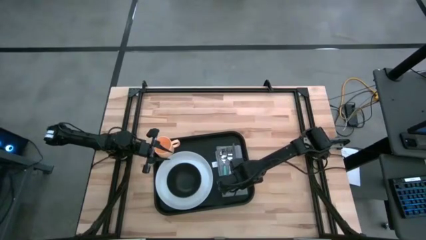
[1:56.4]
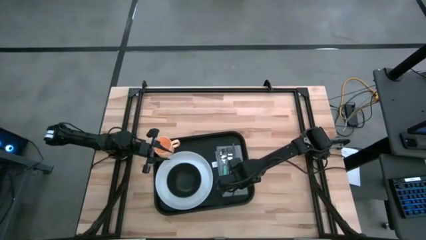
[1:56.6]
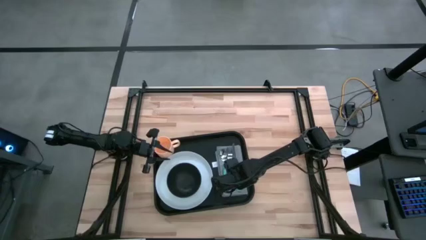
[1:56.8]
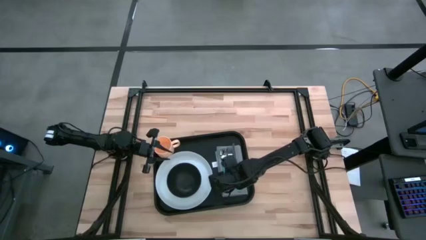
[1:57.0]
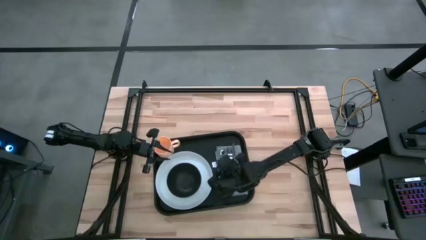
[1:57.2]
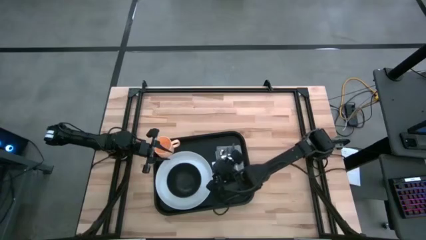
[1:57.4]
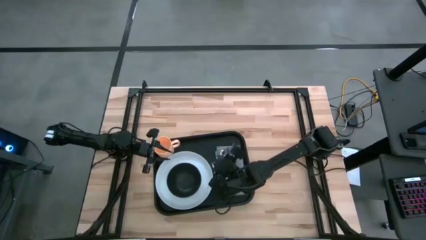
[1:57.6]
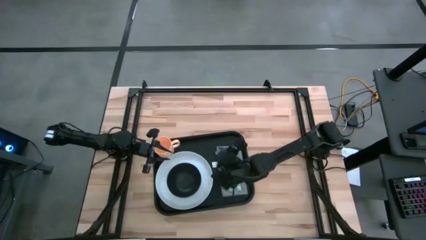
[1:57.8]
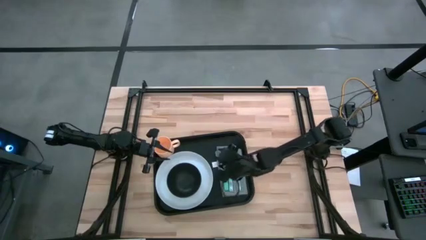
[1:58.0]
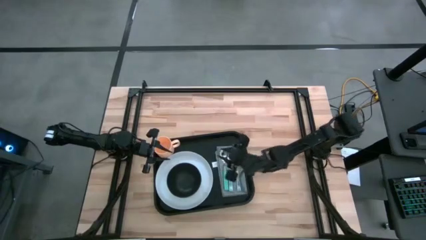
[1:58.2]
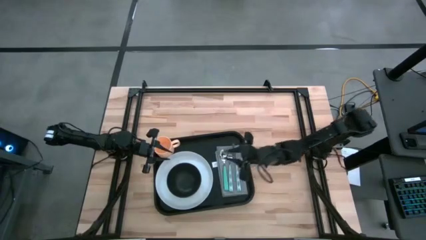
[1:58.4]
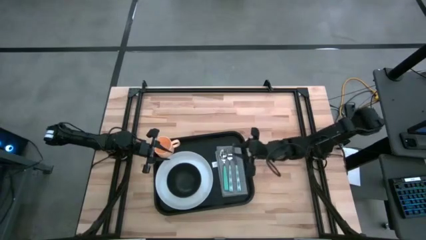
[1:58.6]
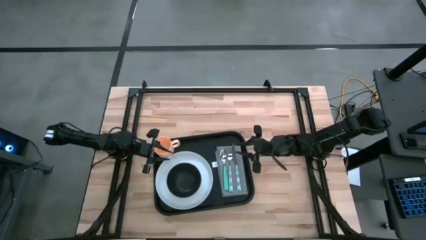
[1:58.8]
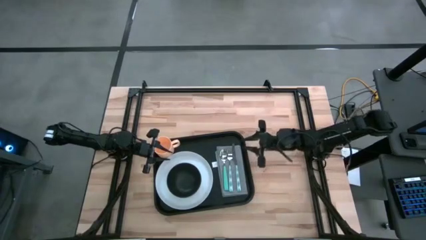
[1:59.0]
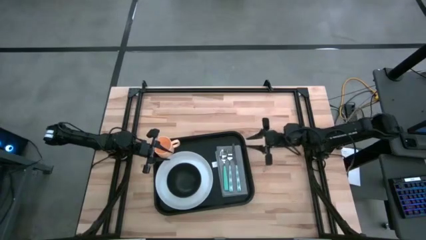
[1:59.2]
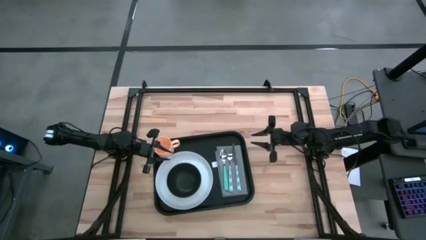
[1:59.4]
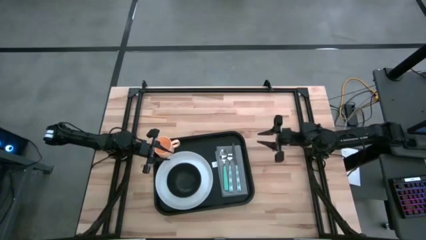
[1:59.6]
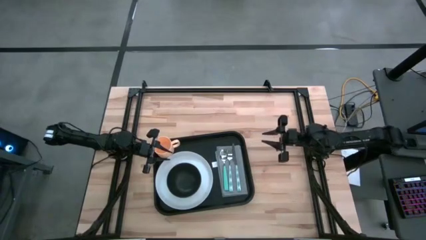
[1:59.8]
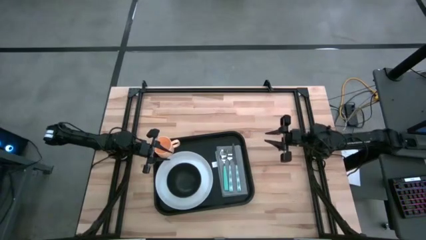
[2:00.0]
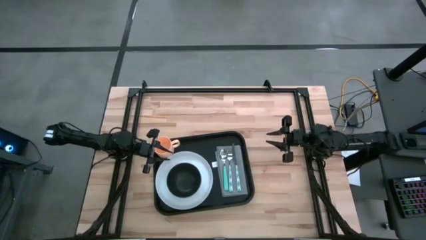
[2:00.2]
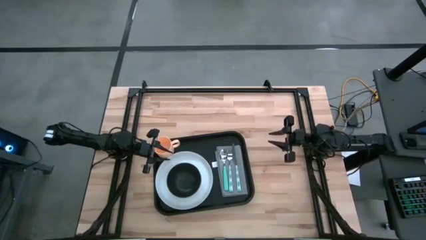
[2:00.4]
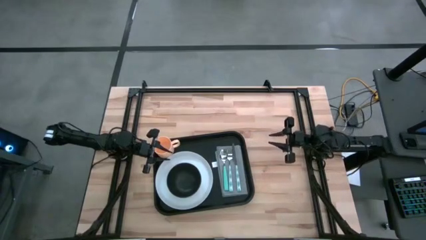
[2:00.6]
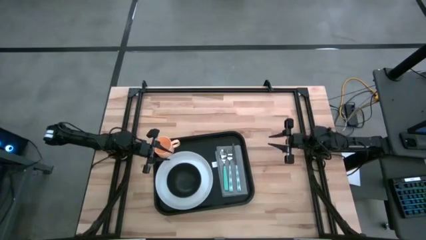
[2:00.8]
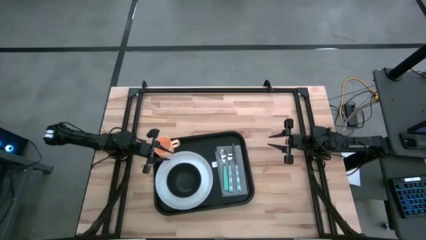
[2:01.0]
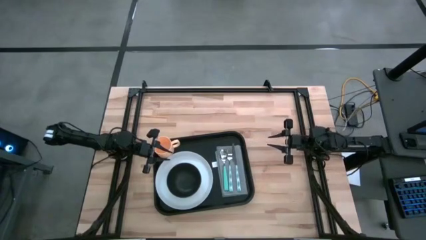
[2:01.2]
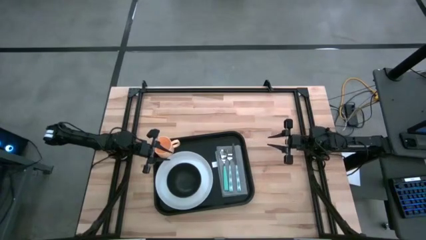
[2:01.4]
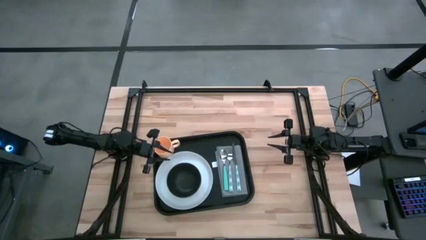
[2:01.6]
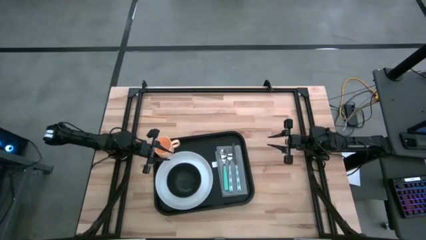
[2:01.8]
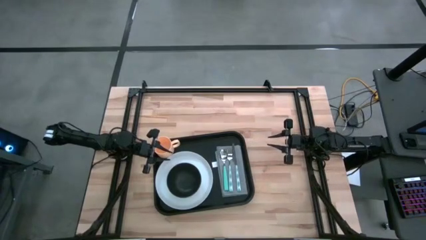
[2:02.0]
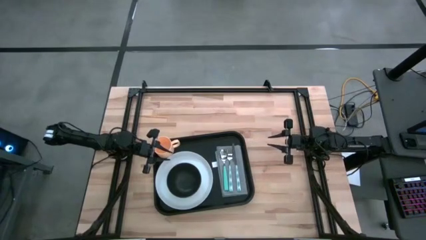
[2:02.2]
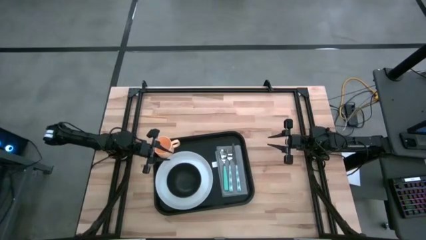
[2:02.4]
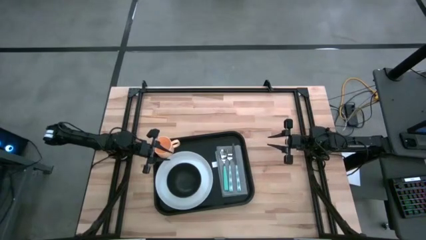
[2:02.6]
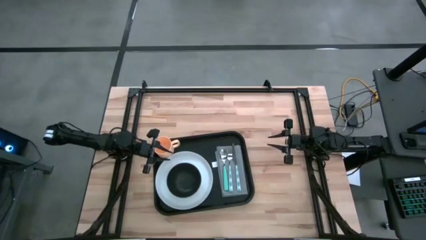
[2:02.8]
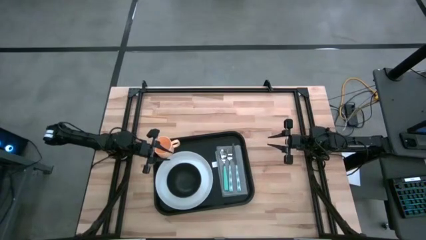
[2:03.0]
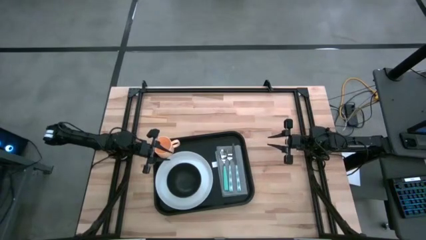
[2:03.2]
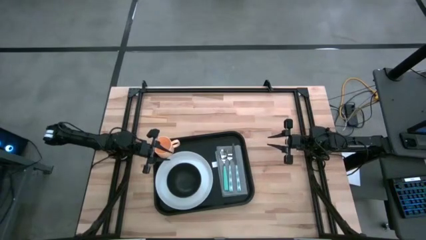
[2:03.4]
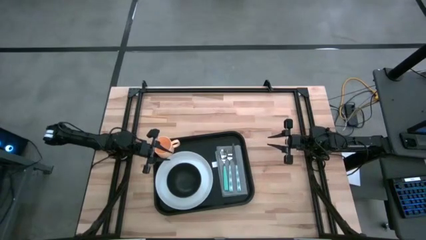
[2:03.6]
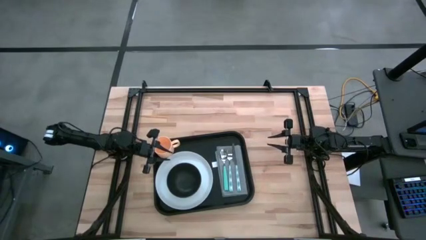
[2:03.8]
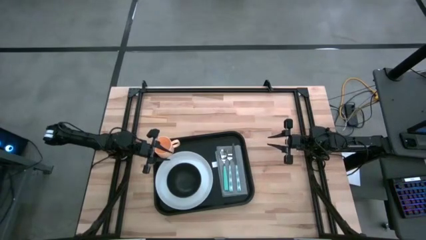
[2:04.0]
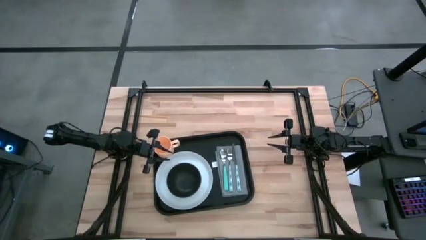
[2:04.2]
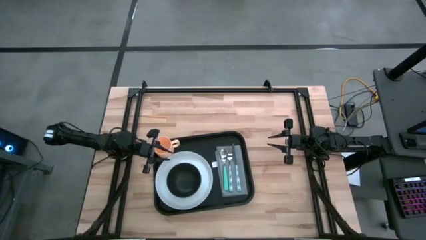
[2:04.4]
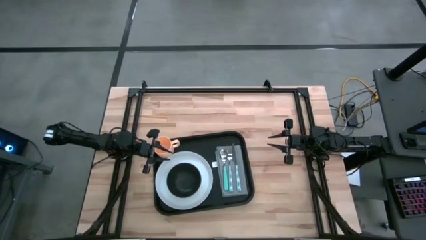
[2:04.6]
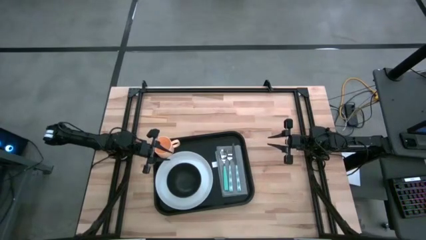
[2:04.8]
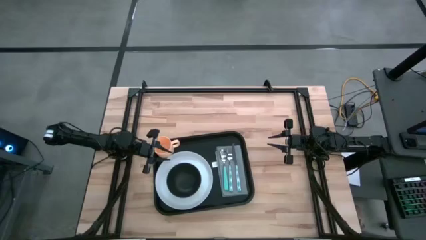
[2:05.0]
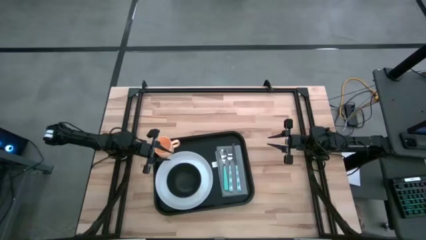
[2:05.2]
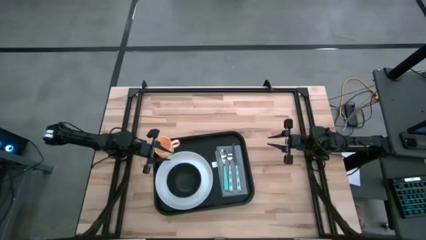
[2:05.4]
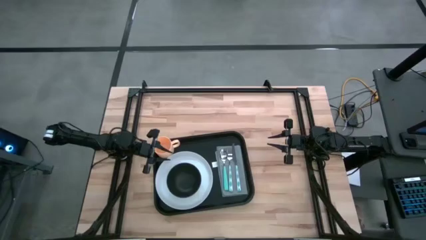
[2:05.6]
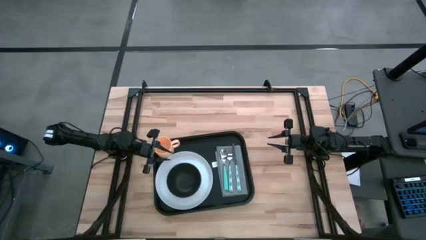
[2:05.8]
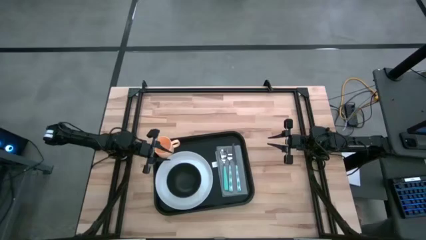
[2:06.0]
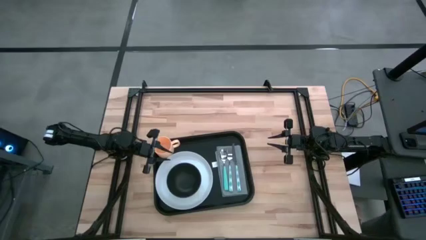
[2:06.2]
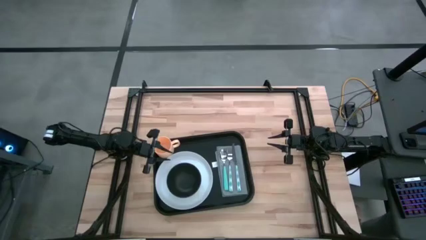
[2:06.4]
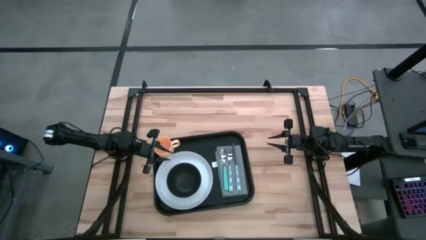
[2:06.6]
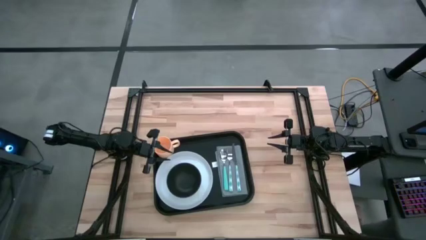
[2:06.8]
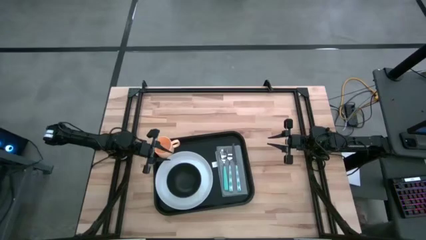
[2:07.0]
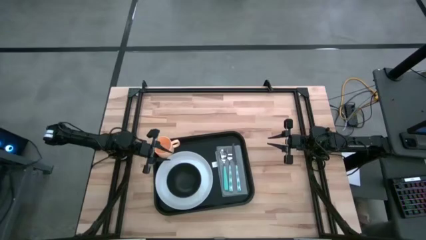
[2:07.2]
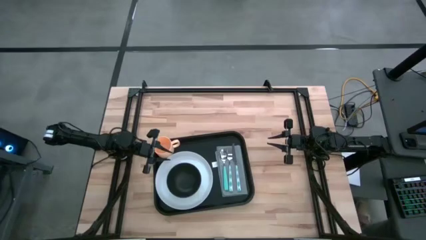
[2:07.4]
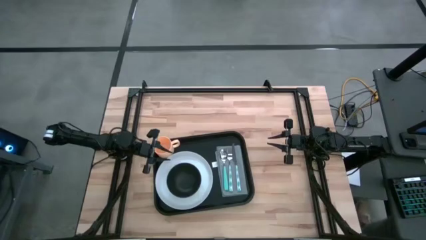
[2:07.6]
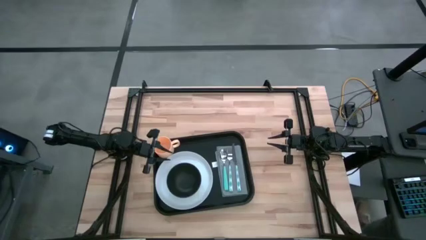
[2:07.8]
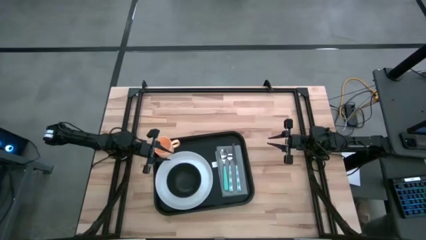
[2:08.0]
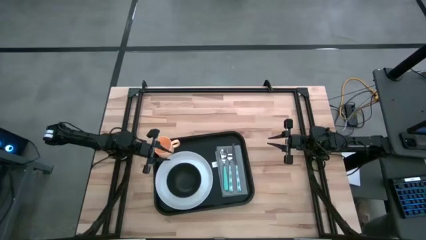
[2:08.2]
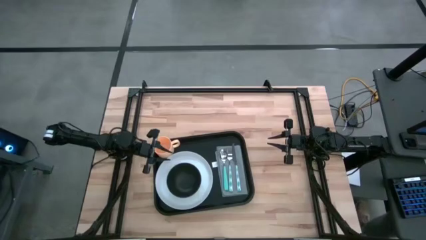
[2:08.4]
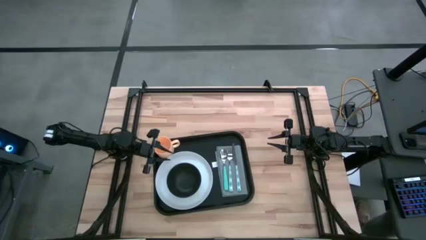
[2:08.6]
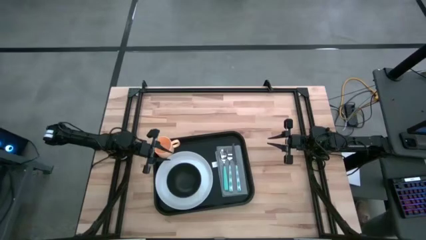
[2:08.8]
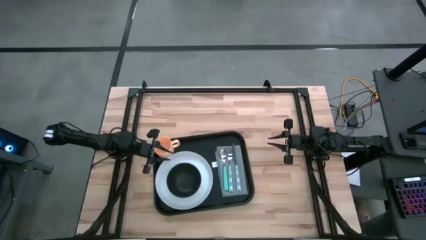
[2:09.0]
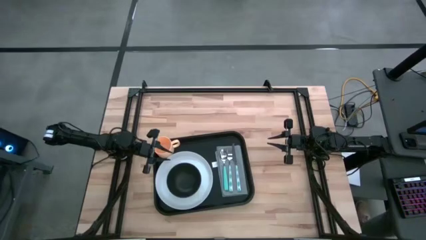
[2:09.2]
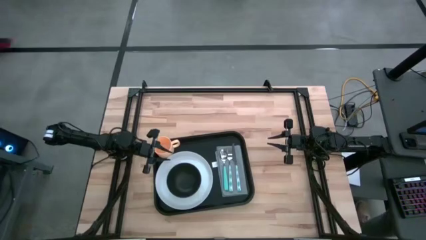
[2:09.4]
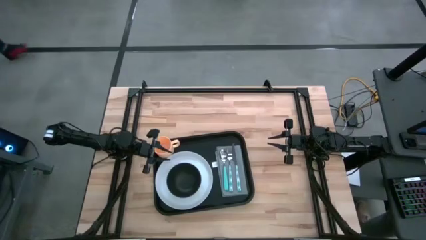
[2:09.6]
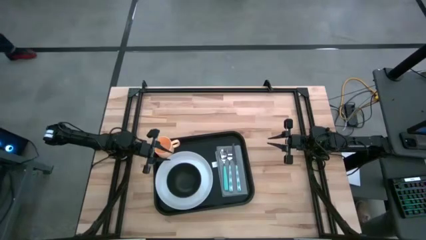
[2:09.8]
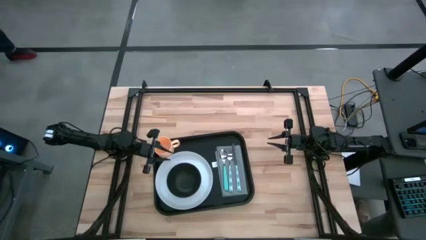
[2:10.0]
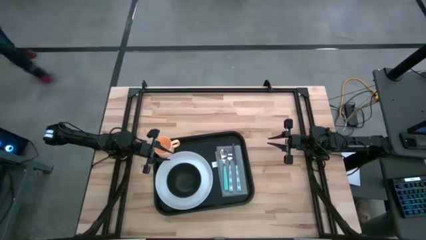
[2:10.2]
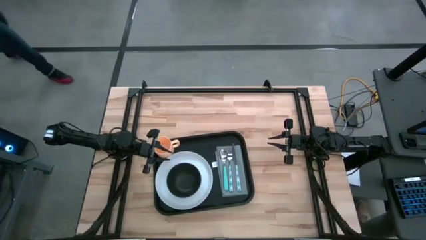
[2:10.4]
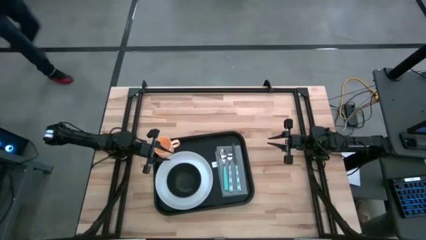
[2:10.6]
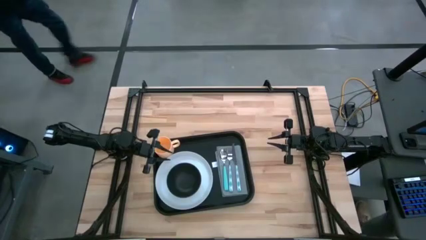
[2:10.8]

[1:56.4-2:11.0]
Task: Set up tray
Return to Home Position
